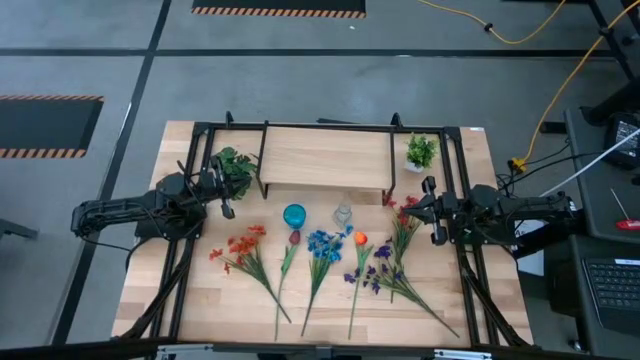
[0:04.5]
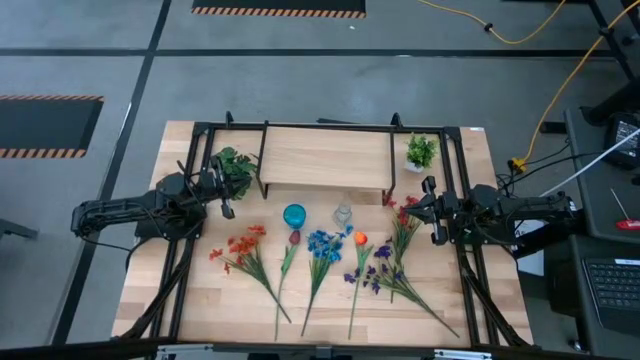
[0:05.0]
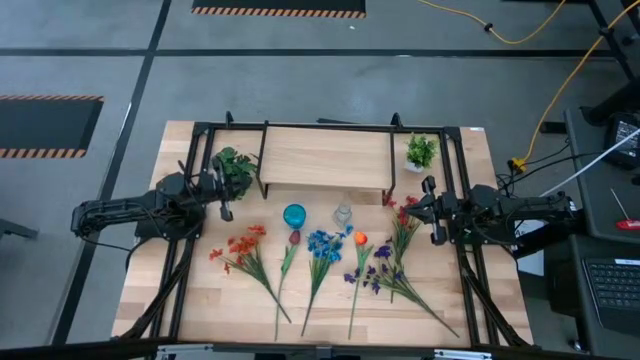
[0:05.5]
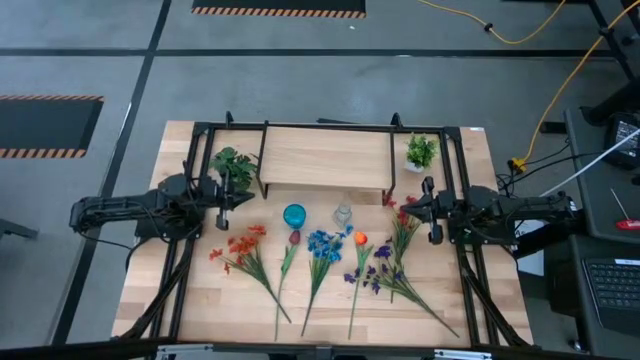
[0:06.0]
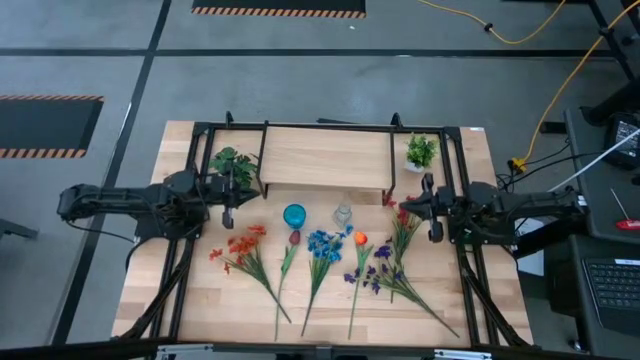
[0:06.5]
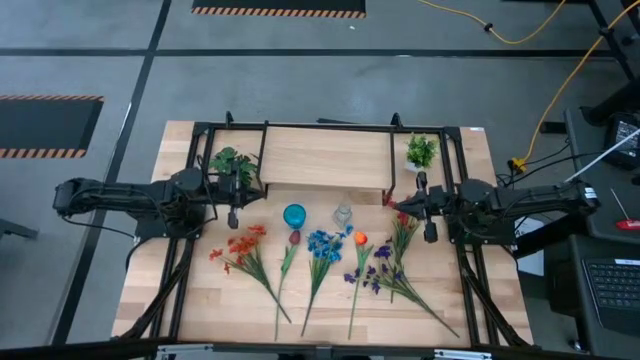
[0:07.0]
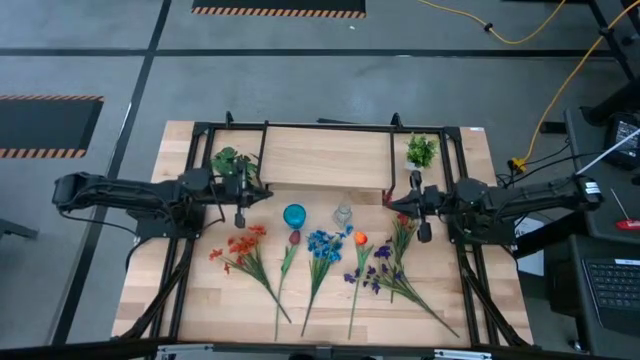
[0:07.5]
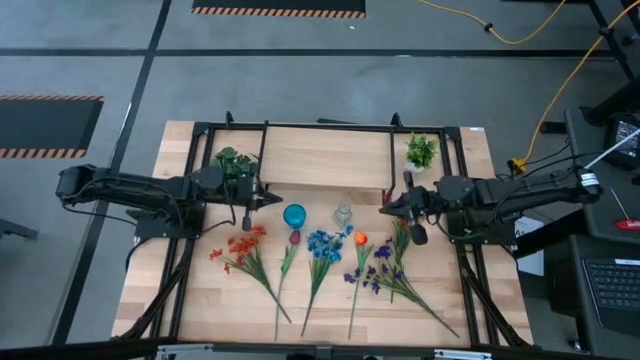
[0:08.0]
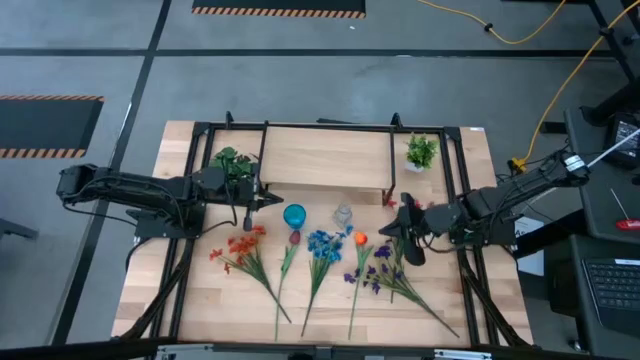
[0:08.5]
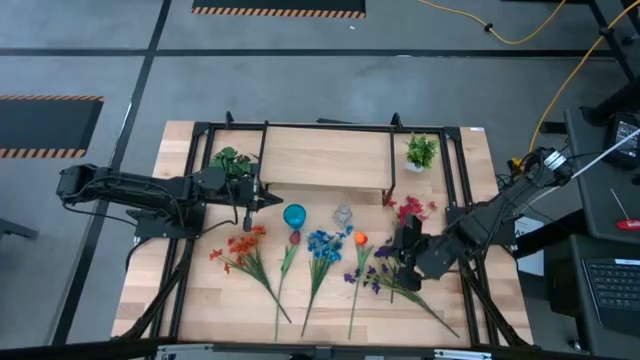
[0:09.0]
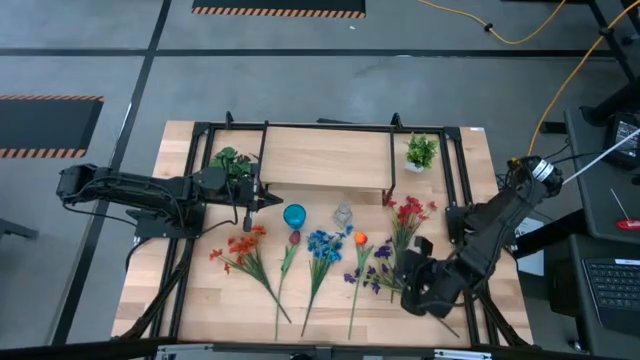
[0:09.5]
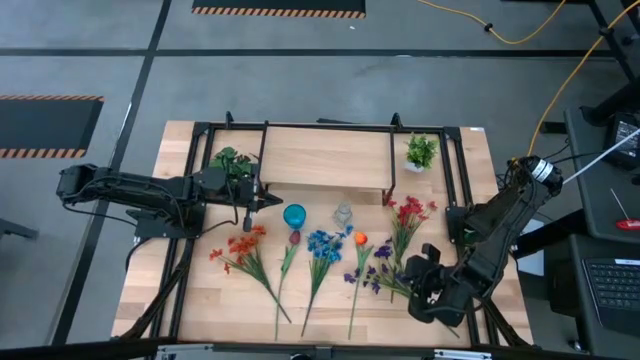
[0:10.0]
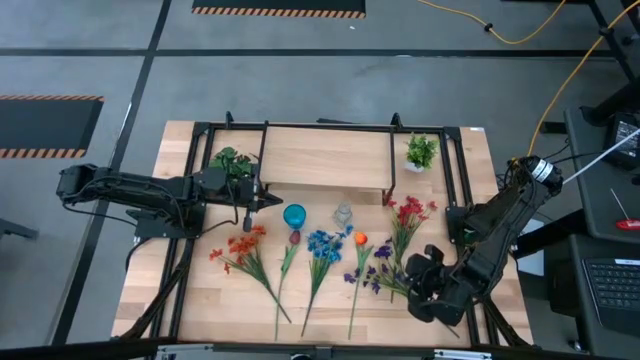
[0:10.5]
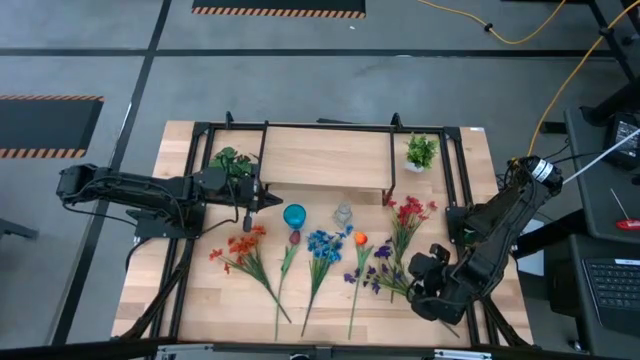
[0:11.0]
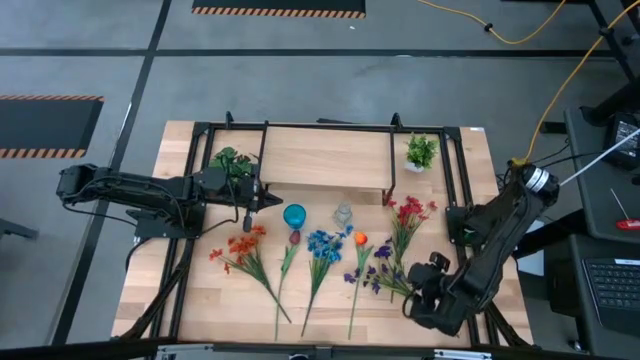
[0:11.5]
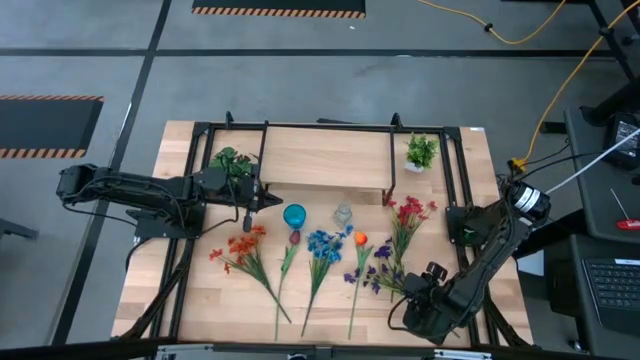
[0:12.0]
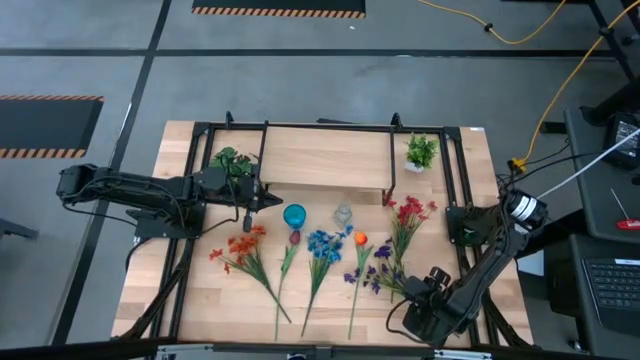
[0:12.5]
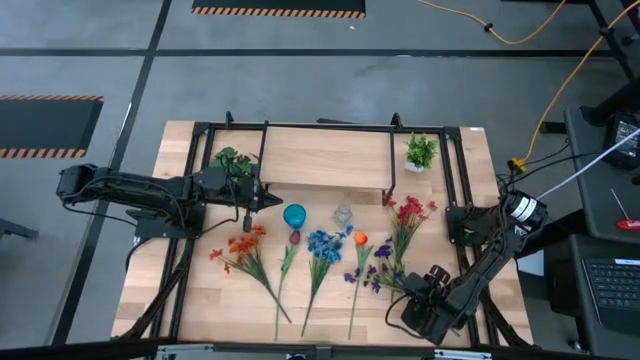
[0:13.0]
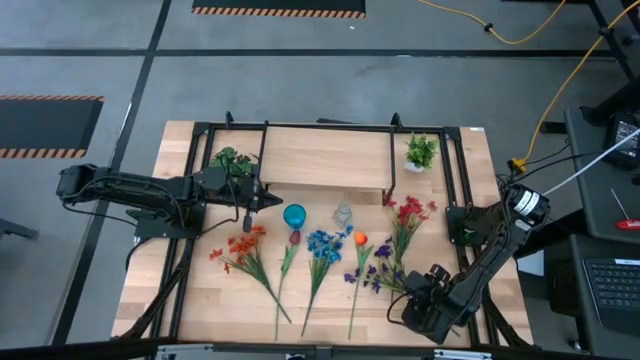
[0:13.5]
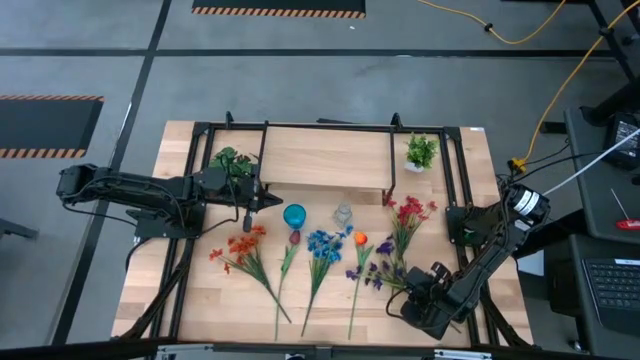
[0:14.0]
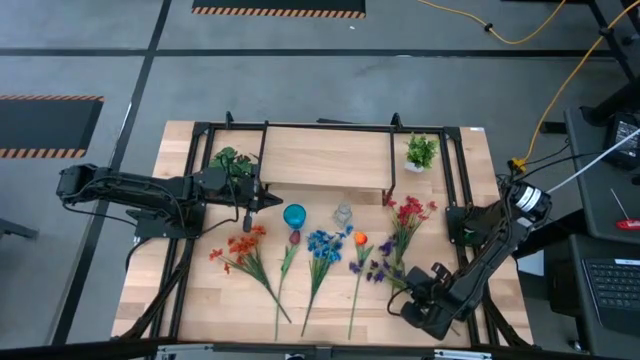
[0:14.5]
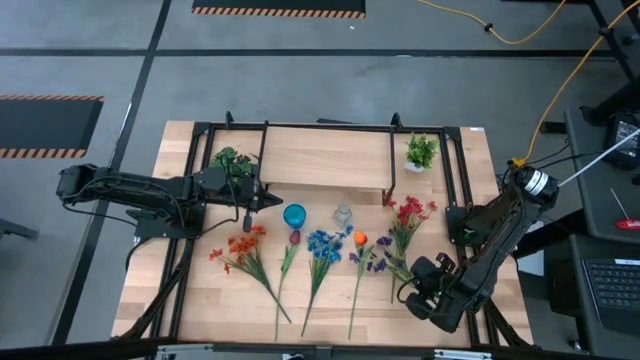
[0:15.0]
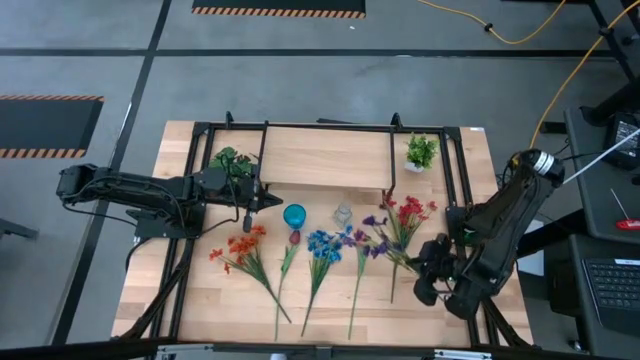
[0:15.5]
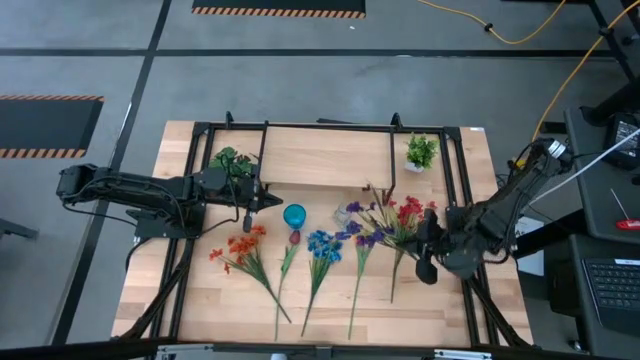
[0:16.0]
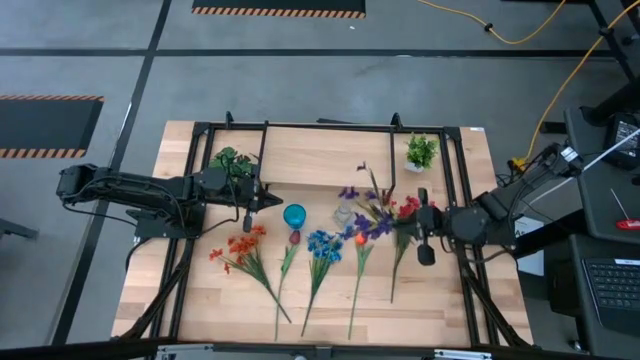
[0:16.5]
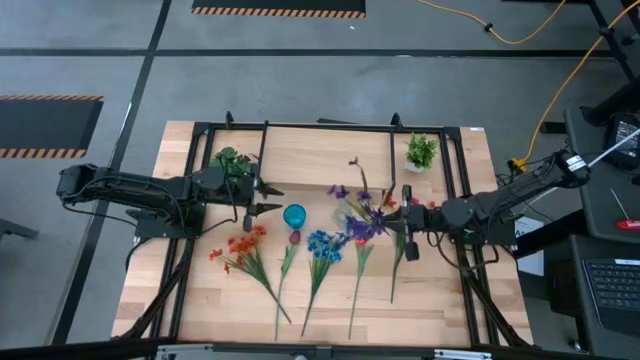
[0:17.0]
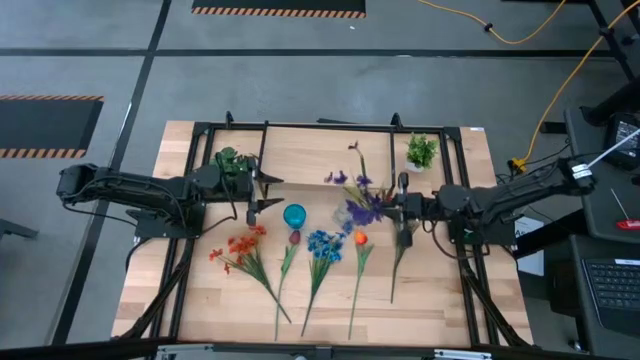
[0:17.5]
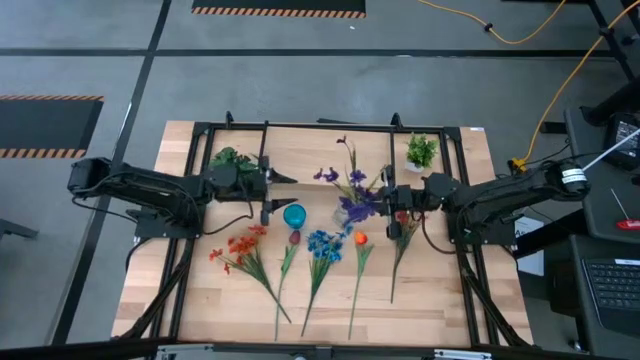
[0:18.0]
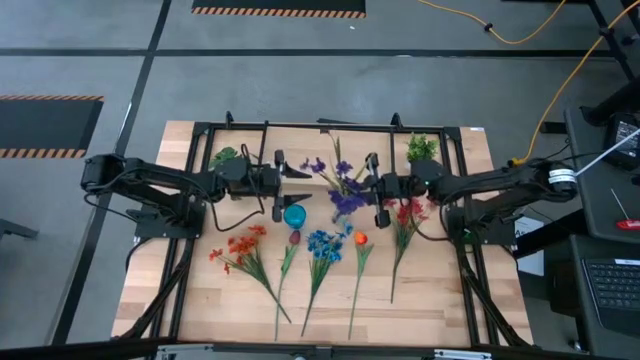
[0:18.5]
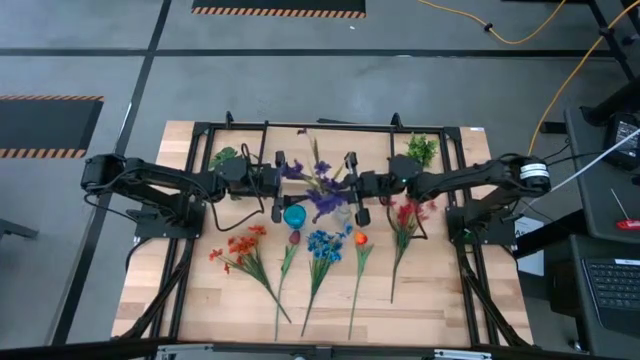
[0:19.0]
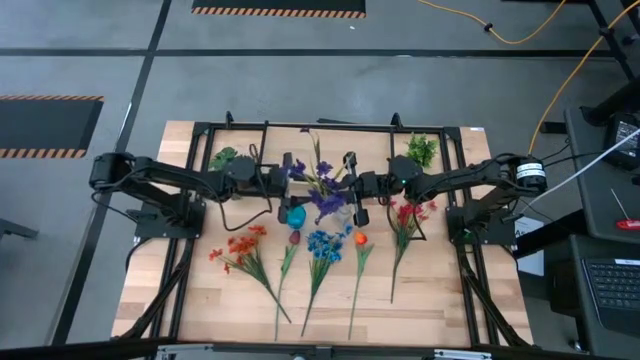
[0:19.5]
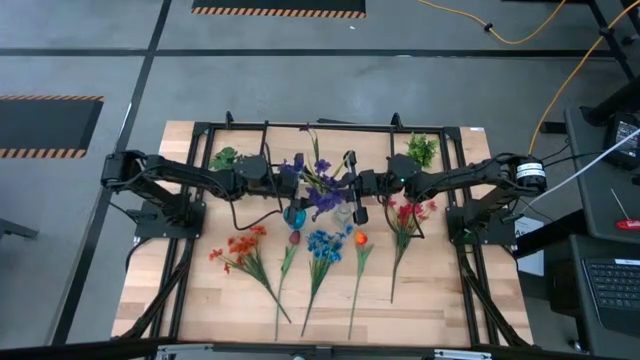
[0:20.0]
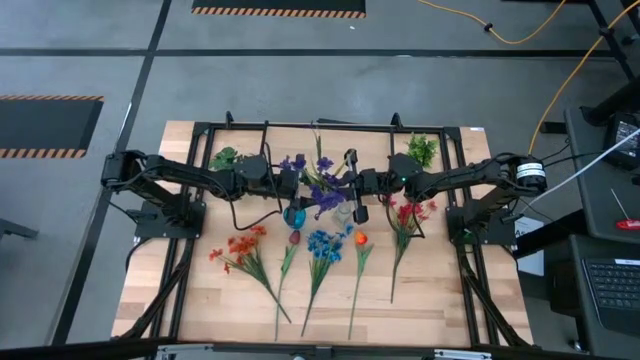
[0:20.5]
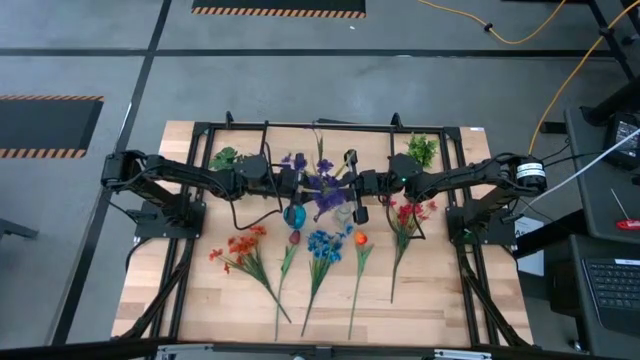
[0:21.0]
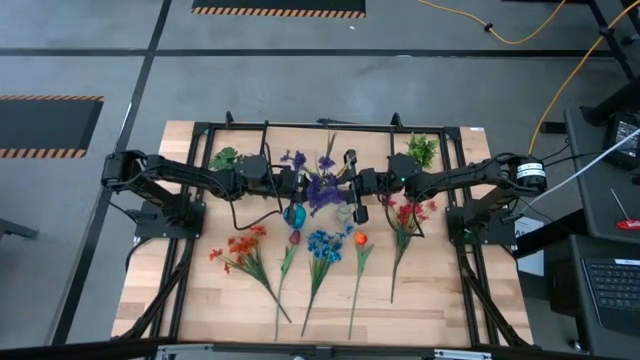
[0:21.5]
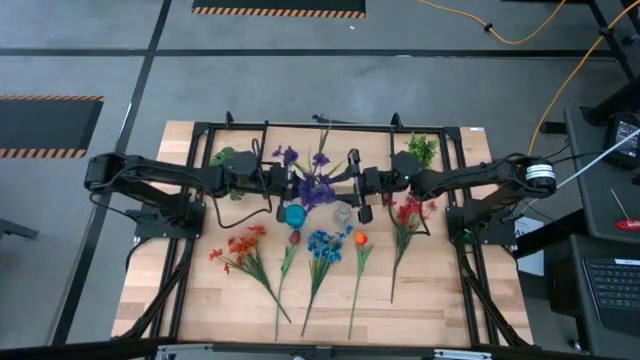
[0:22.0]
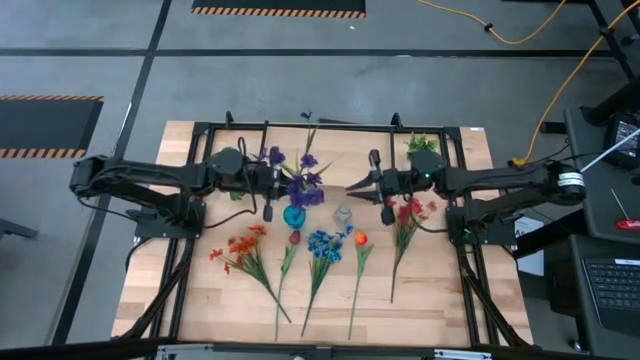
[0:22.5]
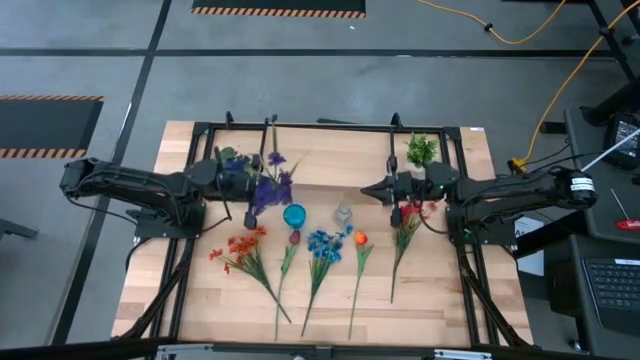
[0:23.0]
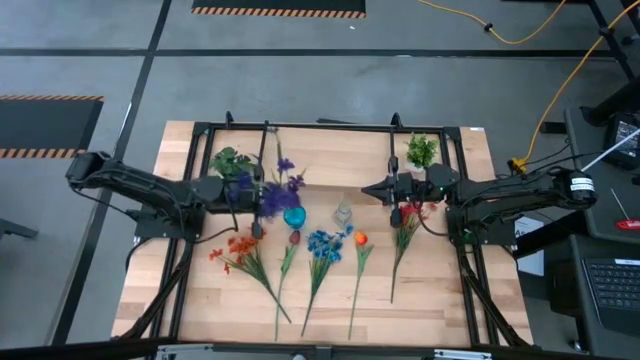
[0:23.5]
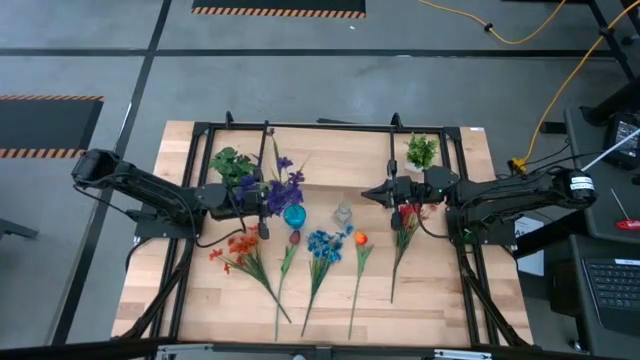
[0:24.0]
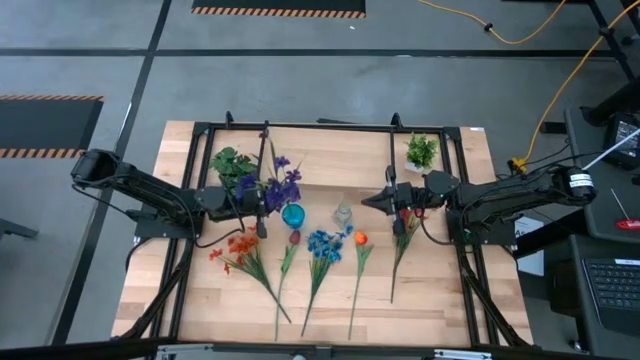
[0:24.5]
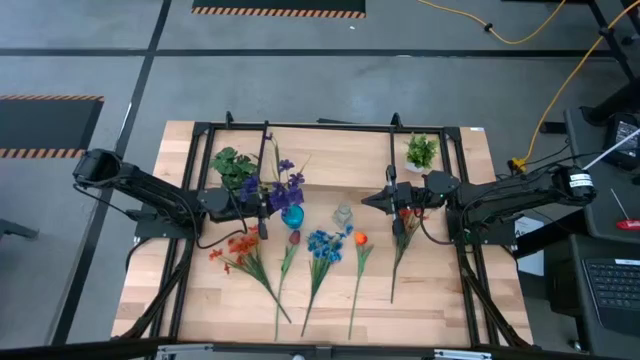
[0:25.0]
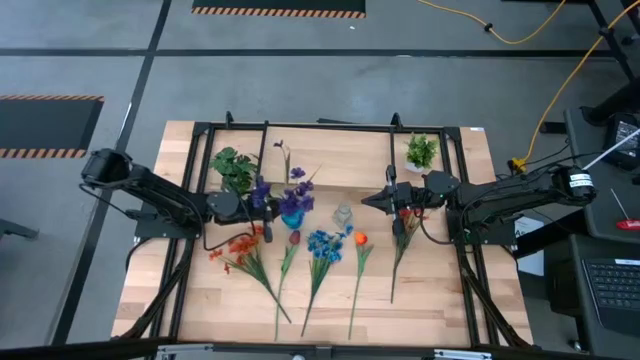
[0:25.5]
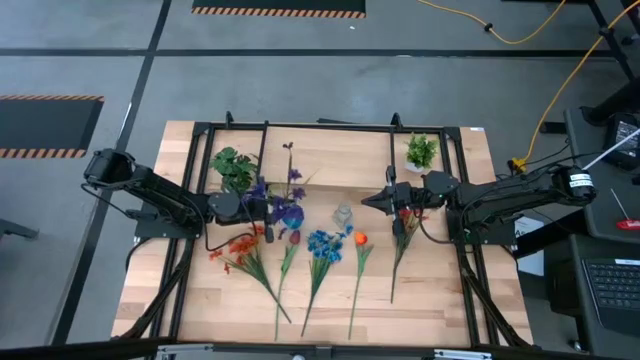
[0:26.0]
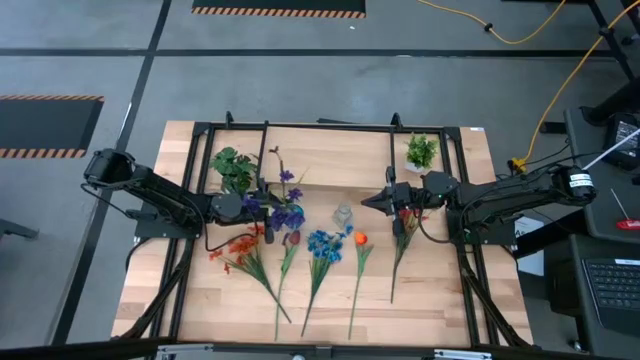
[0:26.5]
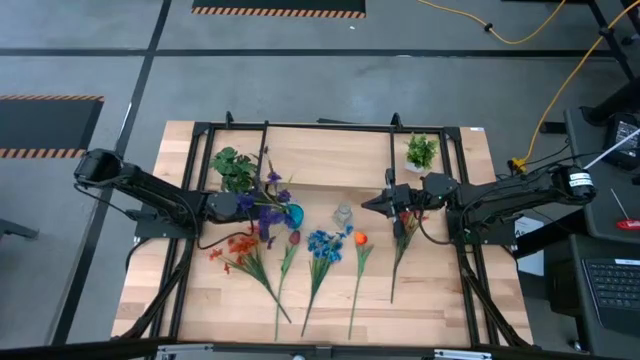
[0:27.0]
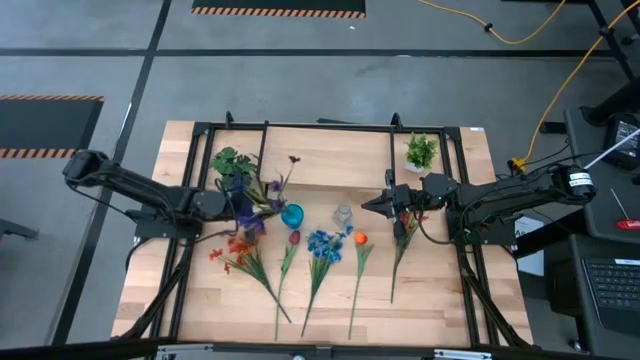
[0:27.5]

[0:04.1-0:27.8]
Task: Pick and place flowers into a vace then onto a shelf
Put the purple flowers into the transparent blue vase
